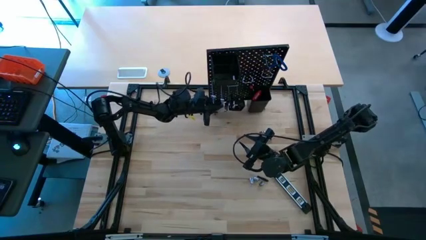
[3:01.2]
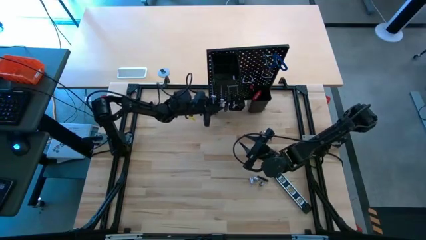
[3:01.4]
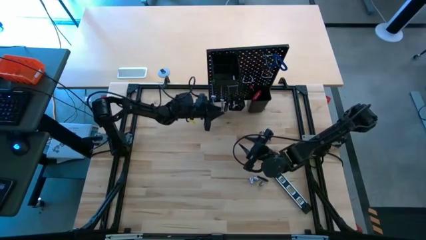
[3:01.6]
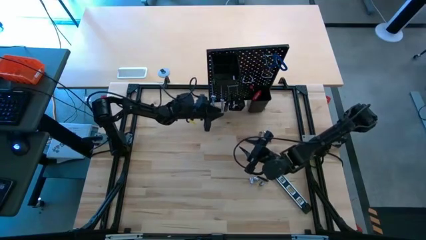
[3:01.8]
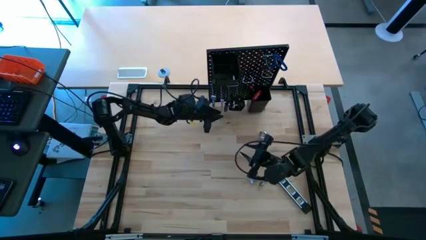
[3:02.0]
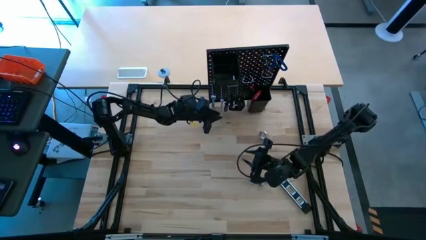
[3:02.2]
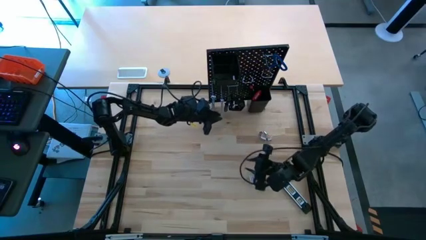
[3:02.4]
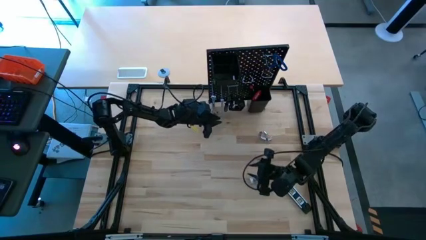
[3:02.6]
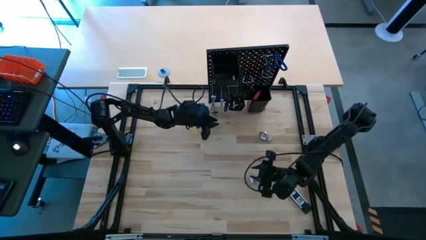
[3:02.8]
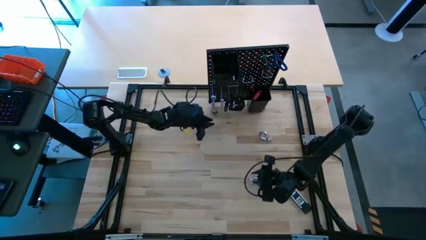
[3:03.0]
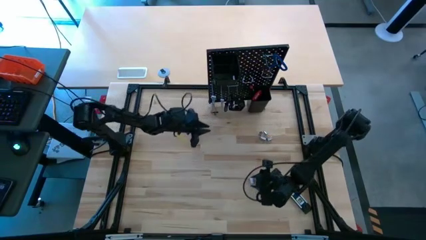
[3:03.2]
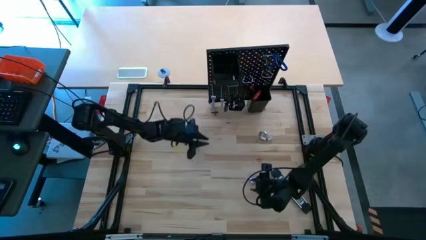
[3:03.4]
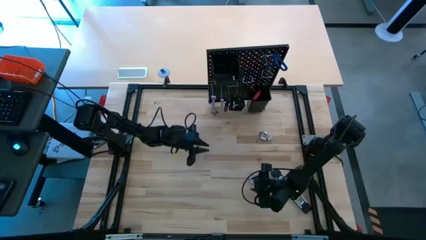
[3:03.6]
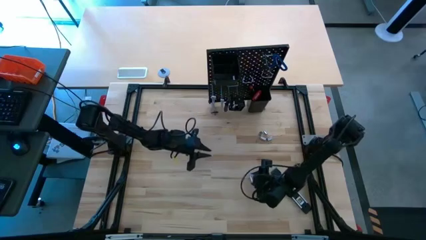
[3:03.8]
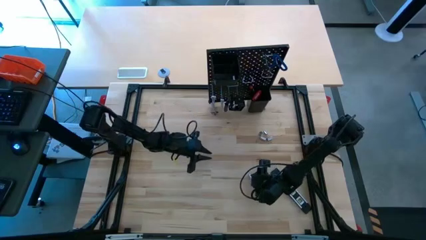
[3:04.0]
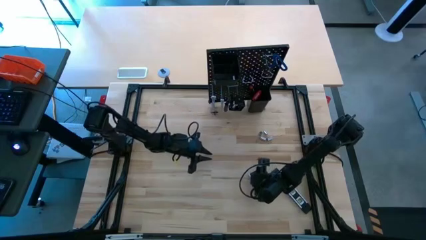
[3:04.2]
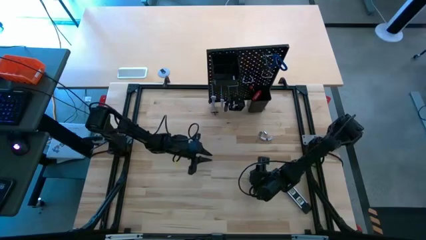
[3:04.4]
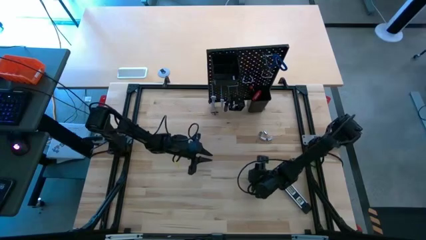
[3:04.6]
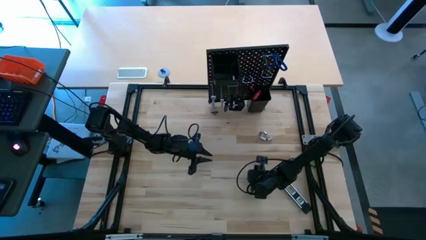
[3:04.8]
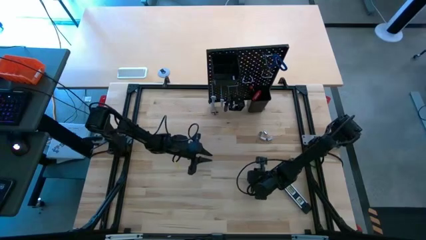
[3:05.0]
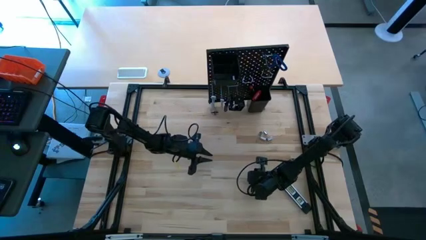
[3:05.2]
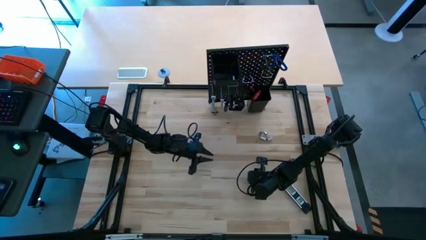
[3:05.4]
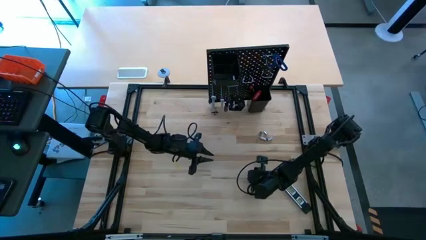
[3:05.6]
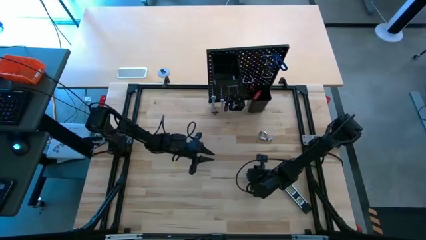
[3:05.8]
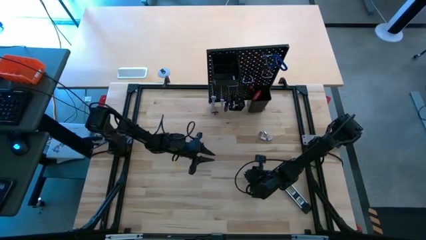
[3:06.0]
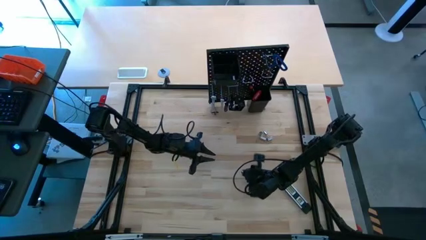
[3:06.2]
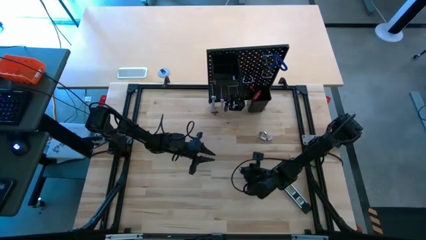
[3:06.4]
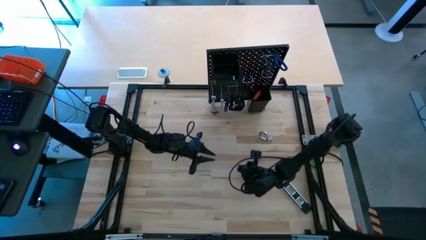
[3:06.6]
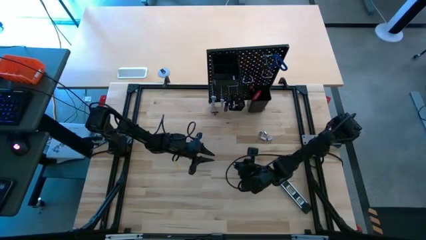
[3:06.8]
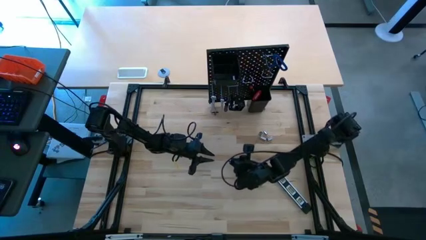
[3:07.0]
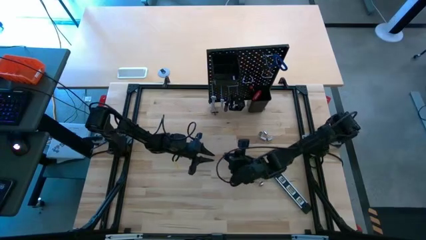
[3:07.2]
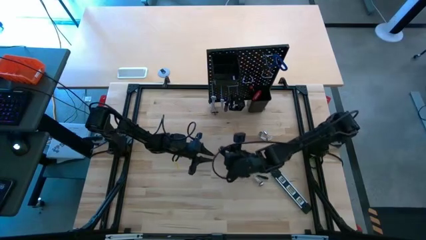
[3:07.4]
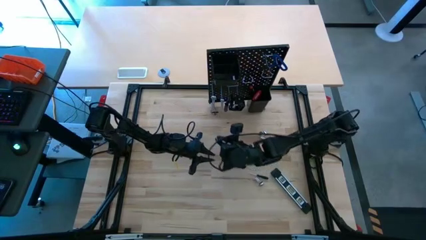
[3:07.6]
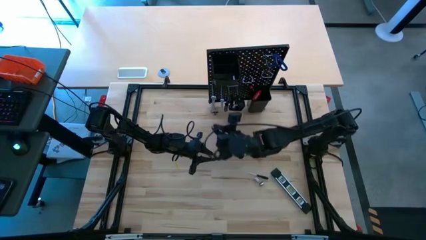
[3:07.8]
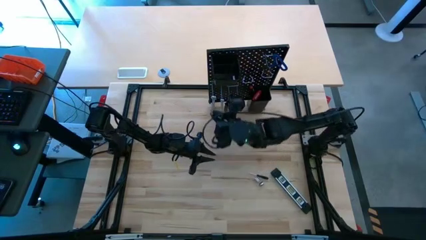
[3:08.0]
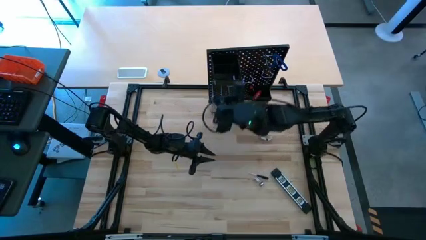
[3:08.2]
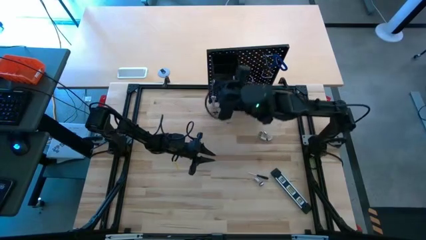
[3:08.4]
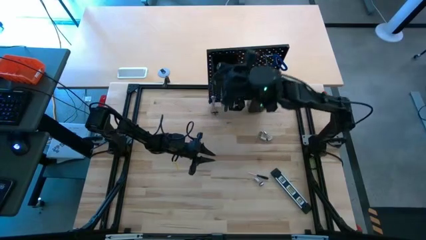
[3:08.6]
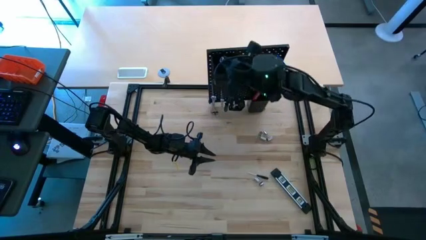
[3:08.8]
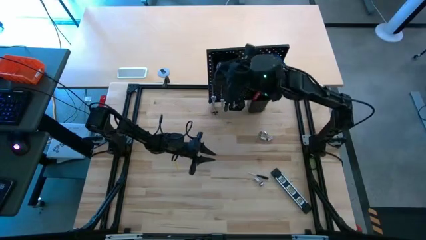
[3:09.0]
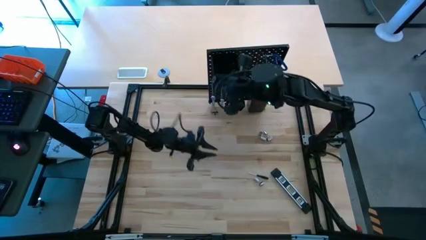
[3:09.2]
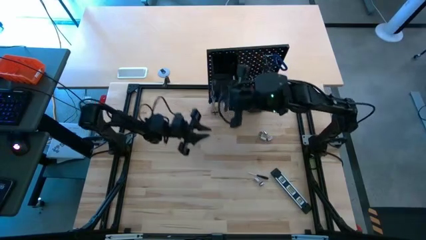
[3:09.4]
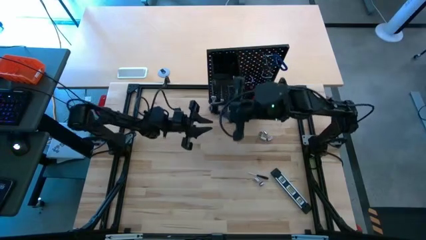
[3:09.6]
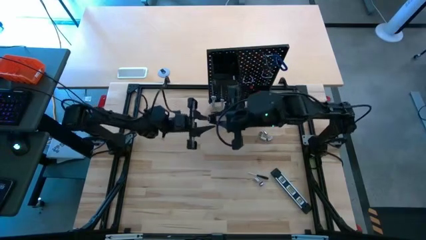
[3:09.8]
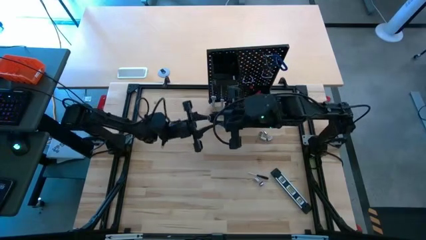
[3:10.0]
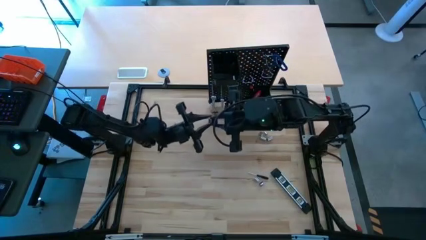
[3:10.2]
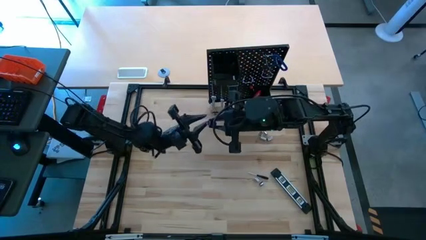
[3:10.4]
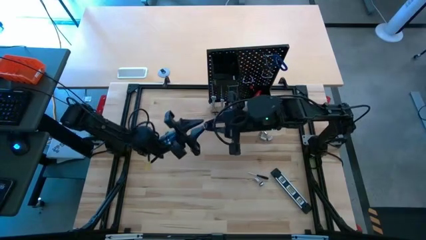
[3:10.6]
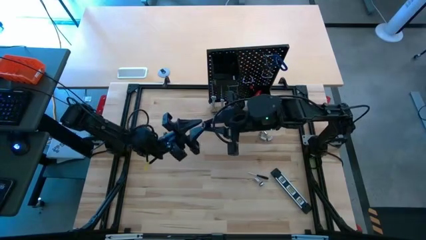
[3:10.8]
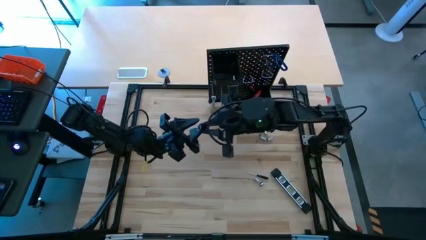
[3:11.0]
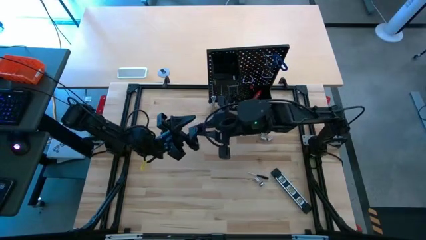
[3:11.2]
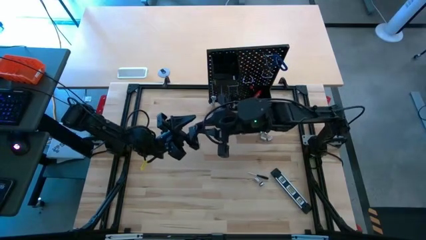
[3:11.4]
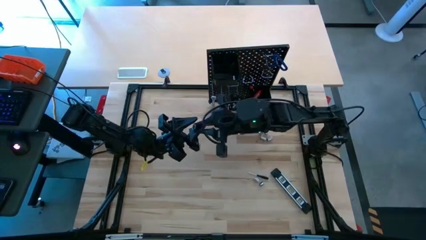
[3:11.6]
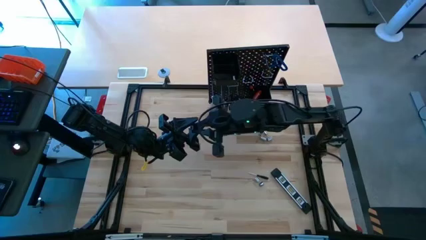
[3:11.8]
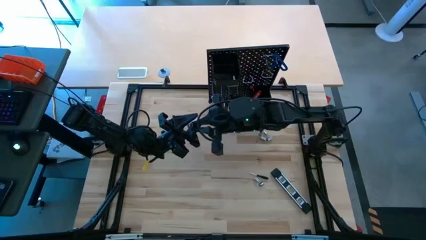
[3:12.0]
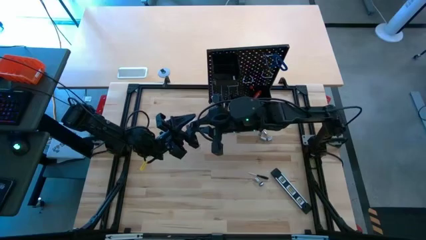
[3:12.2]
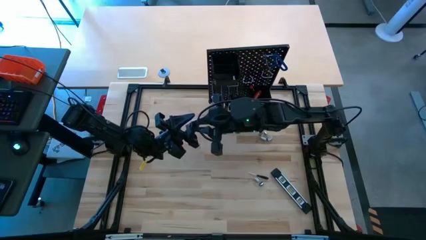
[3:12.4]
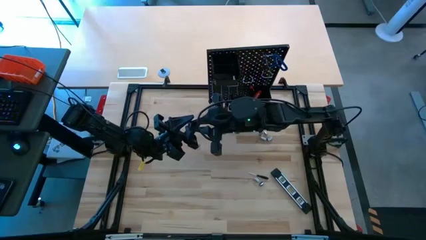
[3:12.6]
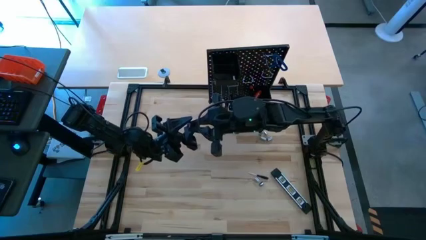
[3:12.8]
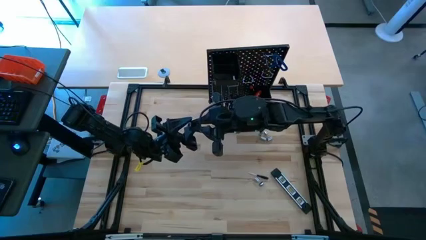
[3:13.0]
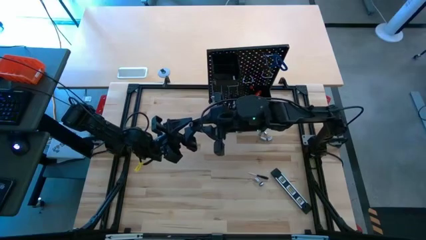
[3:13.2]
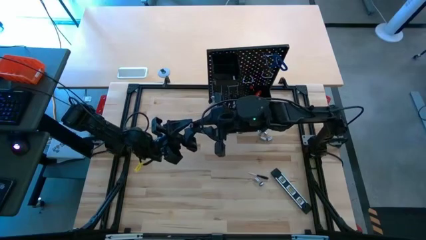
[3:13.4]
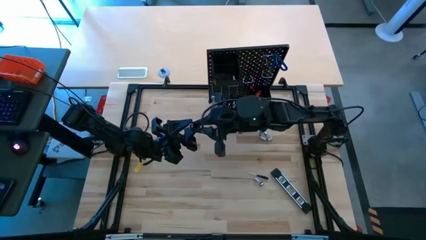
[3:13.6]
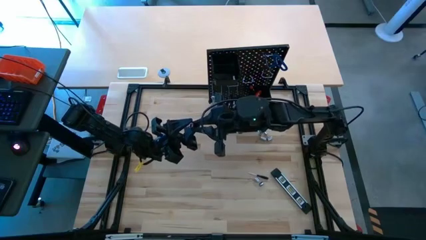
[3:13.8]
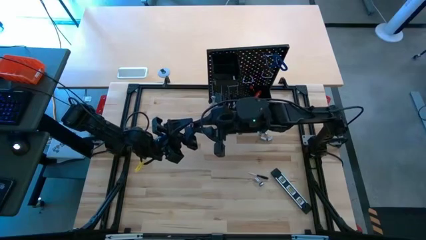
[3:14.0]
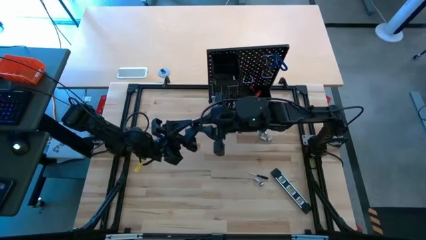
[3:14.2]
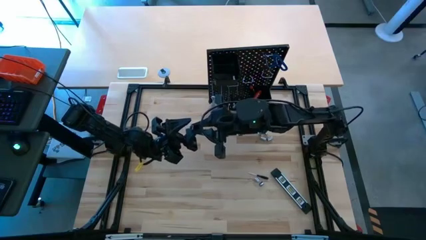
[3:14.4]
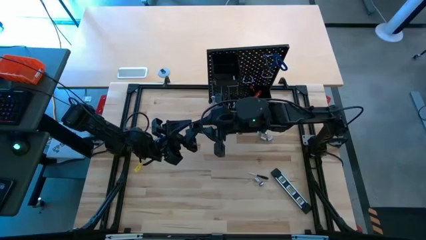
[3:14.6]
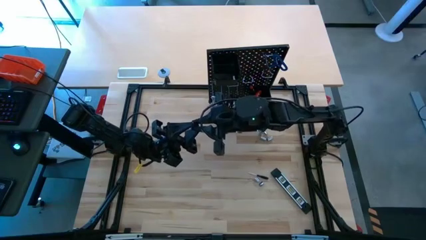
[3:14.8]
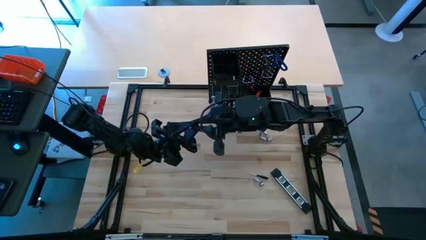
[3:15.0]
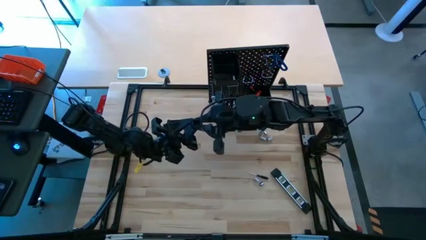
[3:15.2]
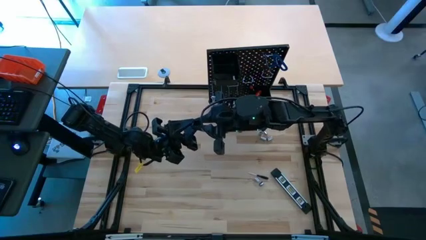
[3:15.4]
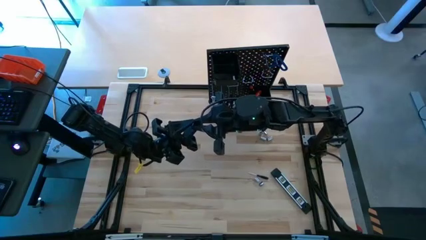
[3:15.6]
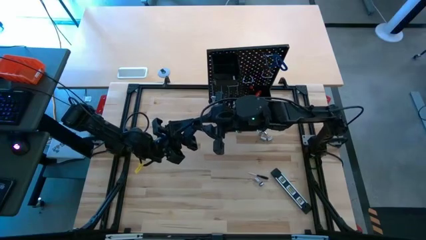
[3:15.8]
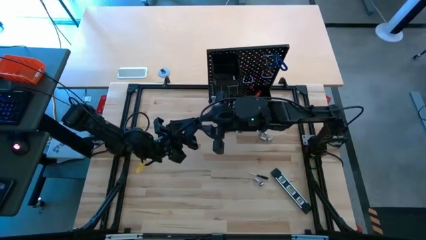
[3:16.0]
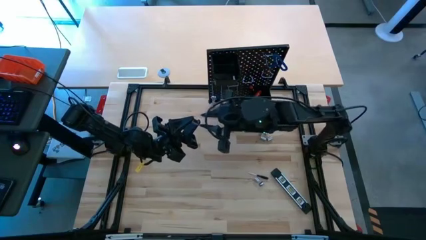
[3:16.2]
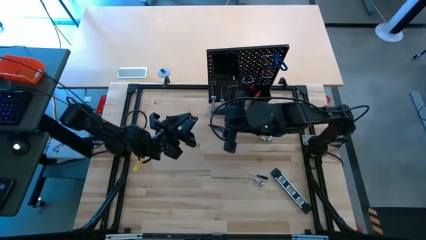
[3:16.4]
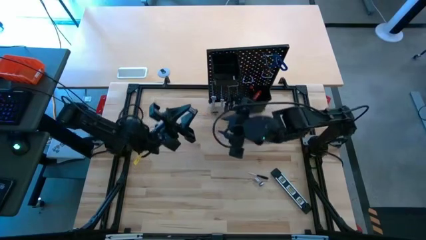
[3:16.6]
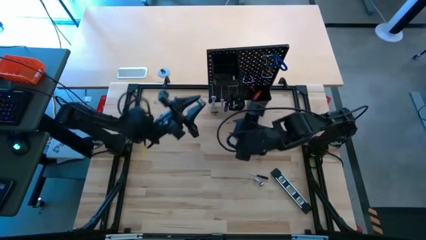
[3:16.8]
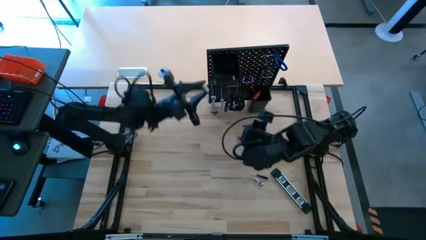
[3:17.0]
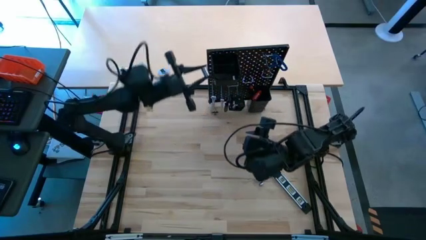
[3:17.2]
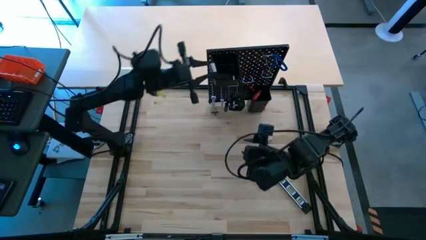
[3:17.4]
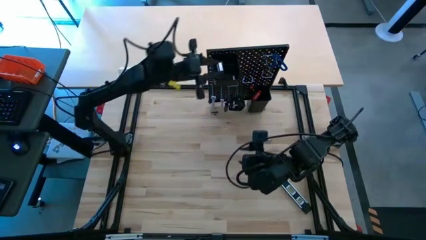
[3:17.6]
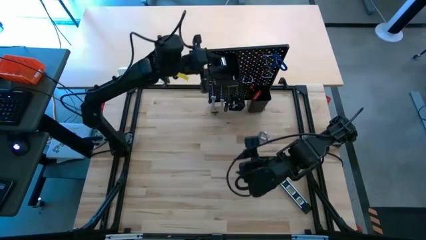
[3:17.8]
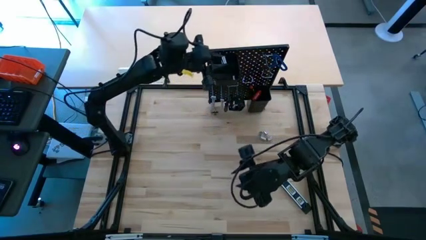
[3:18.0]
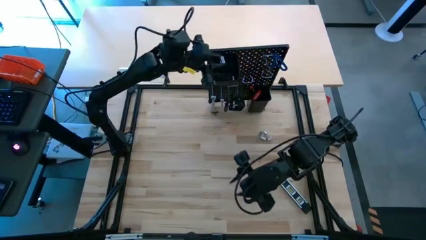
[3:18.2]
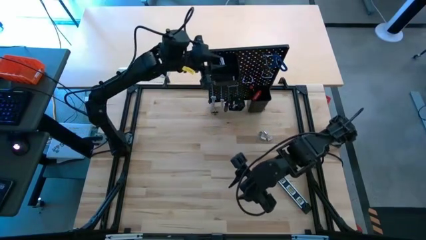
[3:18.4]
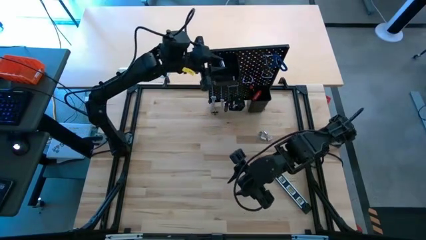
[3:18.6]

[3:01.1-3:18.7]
Task: Hang tools onto peg board
Put the silver socket into the top black bin on the peg board
